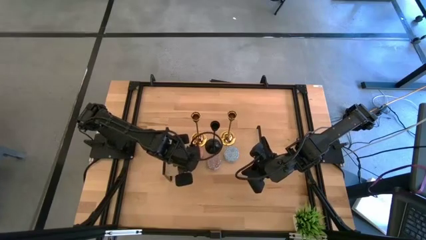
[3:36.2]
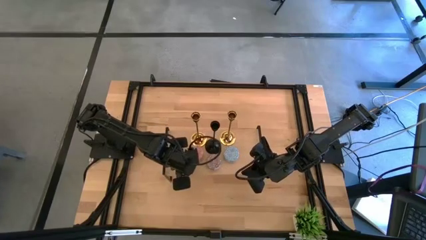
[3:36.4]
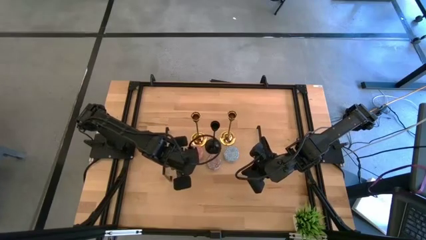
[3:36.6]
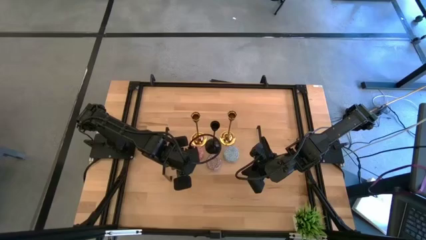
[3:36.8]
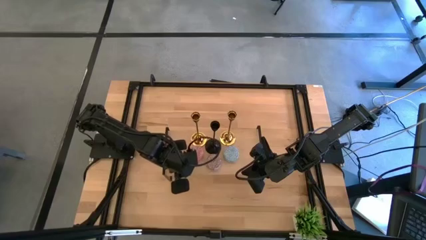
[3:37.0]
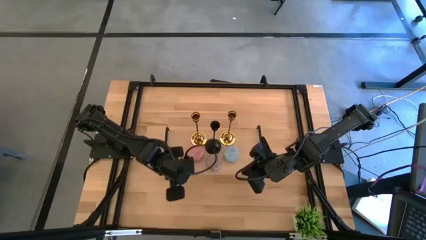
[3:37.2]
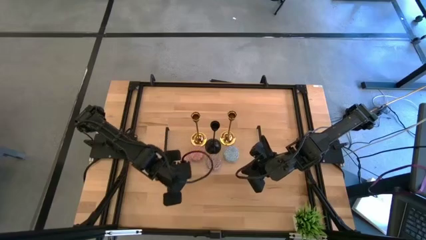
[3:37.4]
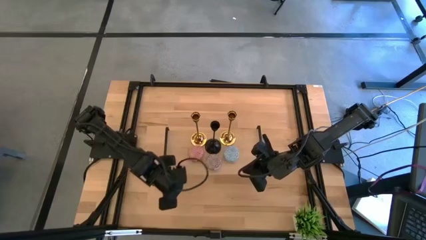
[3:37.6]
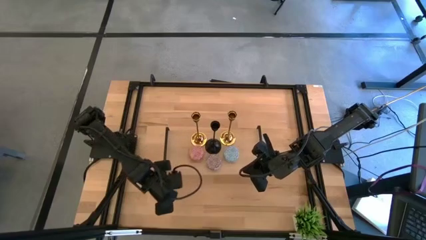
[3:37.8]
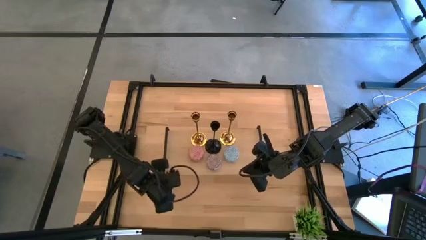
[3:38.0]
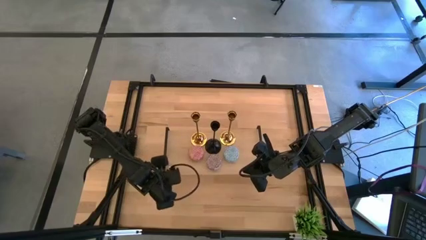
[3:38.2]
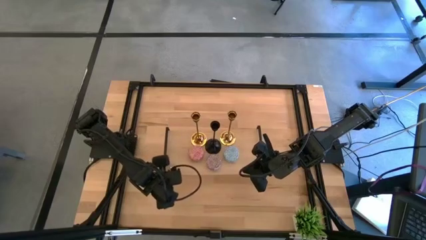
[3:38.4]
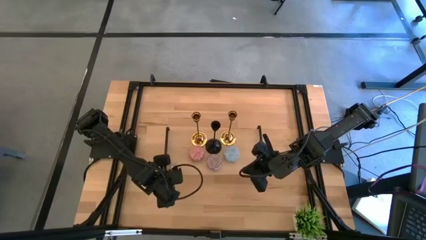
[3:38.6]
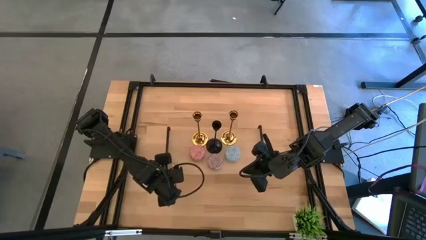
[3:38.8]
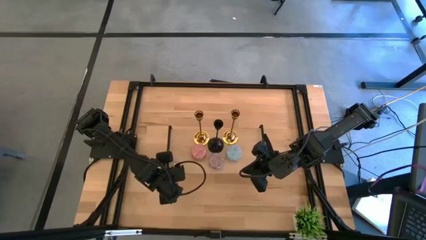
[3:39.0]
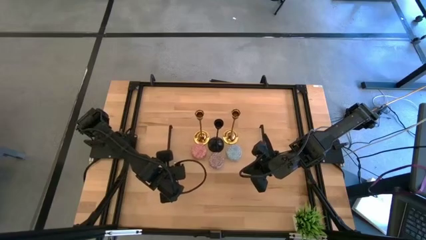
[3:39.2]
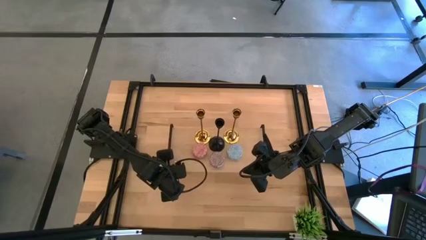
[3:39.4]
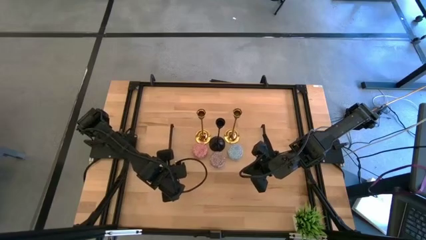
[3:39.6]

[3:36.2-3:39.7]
Task: Pick & Place candle stick holders
Adjust the shelf

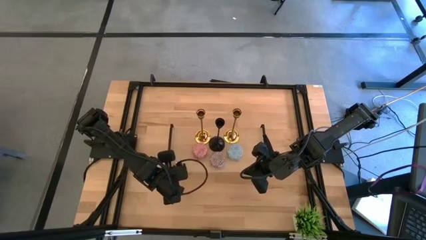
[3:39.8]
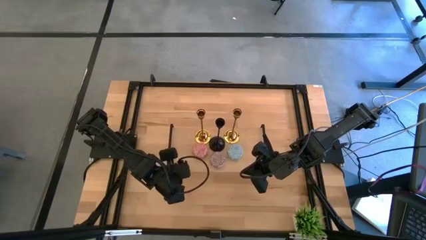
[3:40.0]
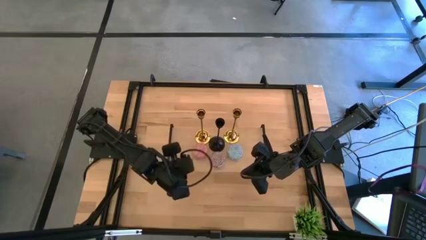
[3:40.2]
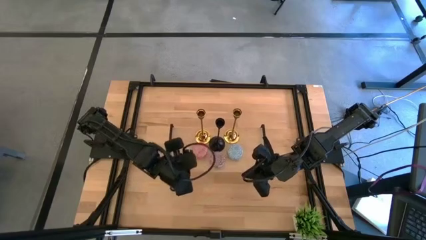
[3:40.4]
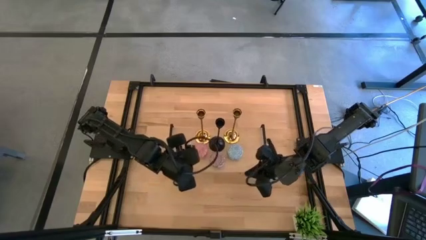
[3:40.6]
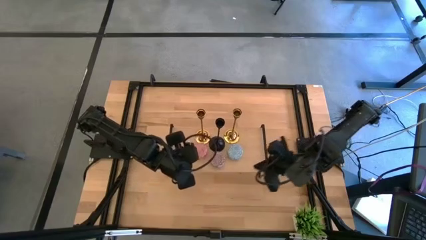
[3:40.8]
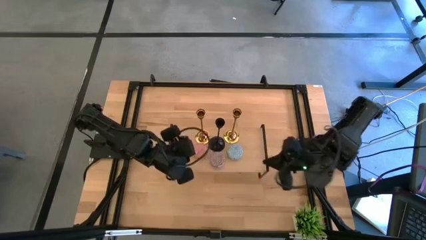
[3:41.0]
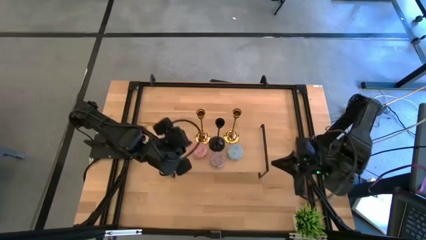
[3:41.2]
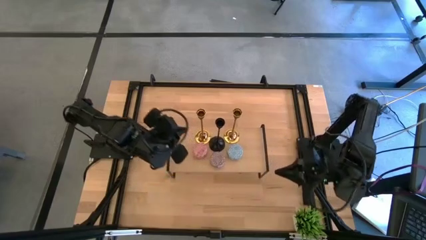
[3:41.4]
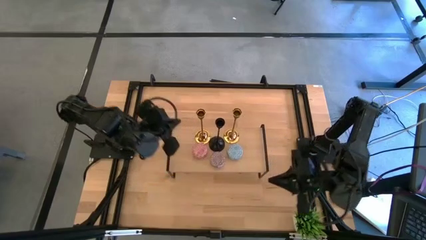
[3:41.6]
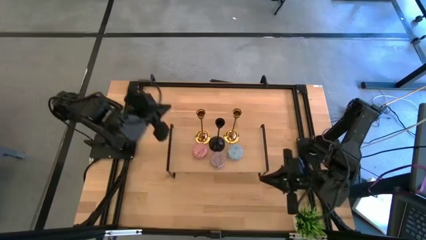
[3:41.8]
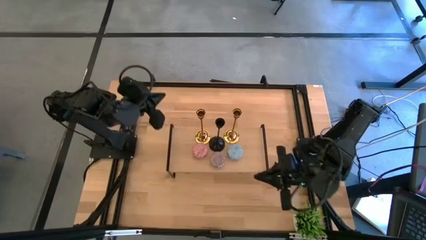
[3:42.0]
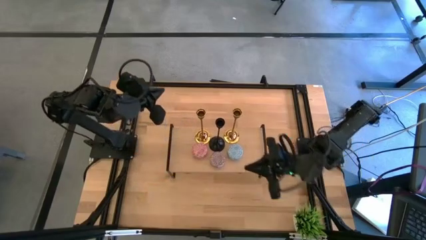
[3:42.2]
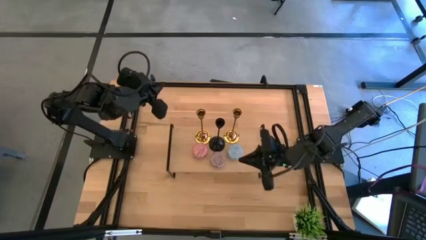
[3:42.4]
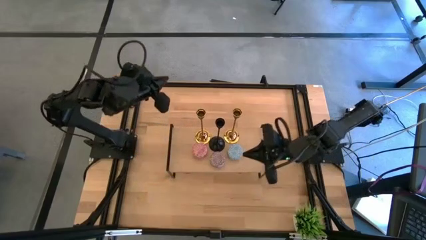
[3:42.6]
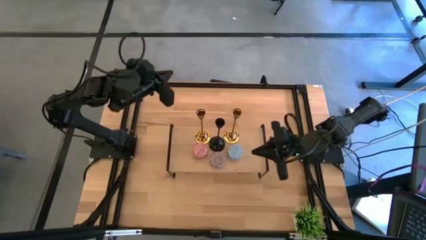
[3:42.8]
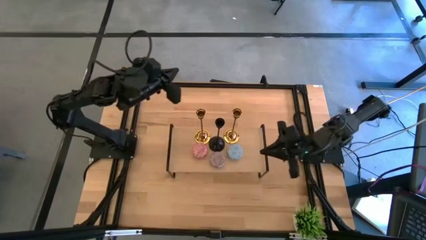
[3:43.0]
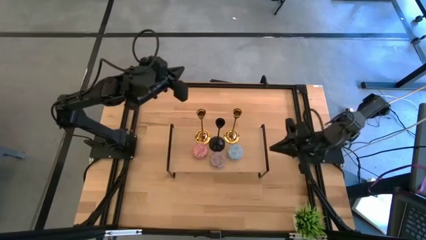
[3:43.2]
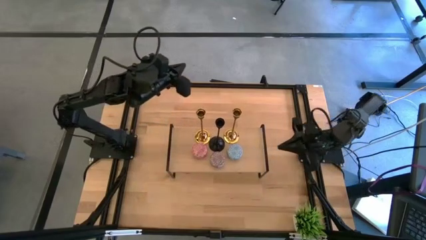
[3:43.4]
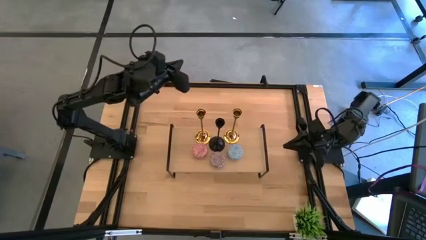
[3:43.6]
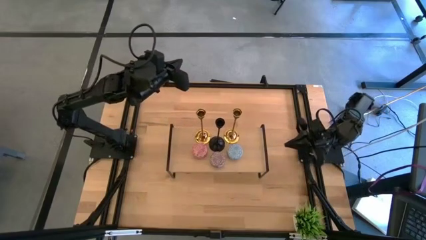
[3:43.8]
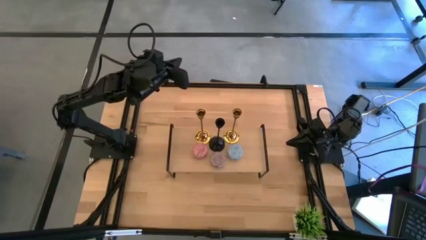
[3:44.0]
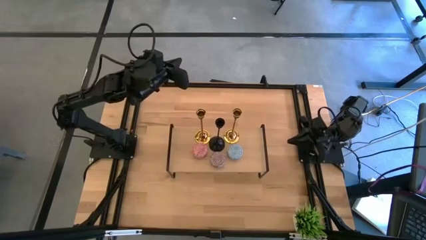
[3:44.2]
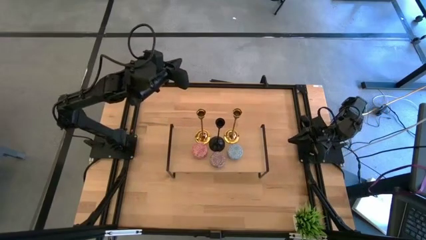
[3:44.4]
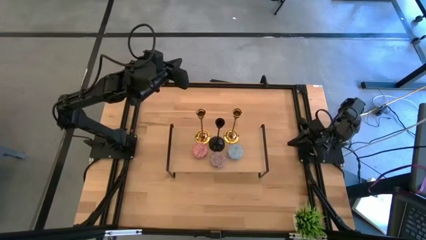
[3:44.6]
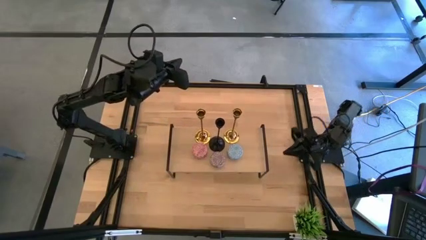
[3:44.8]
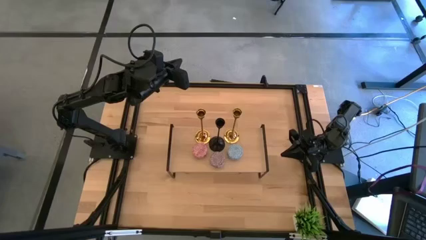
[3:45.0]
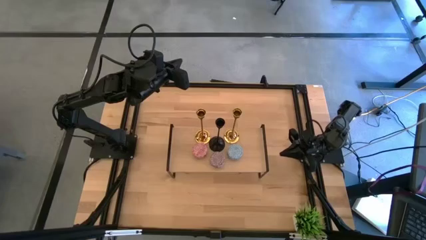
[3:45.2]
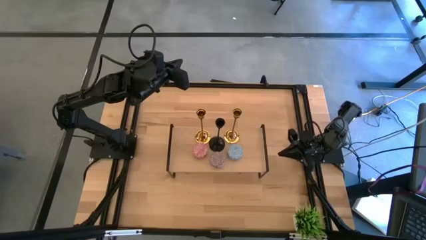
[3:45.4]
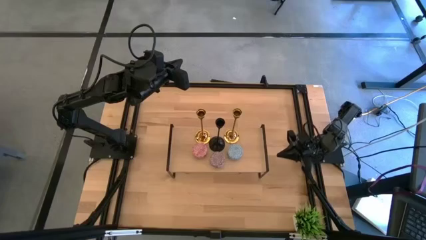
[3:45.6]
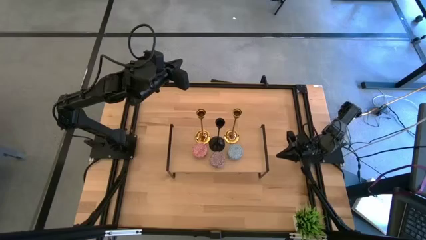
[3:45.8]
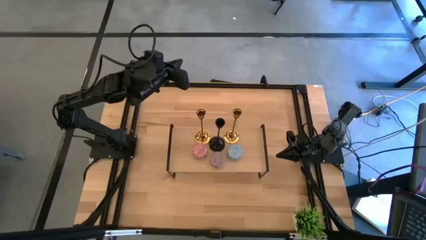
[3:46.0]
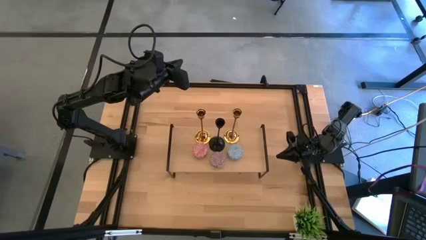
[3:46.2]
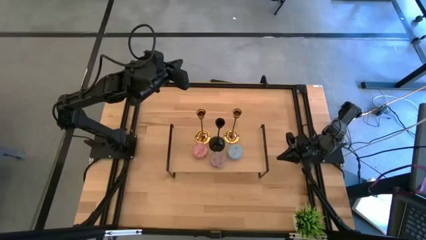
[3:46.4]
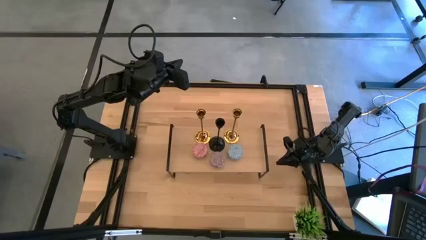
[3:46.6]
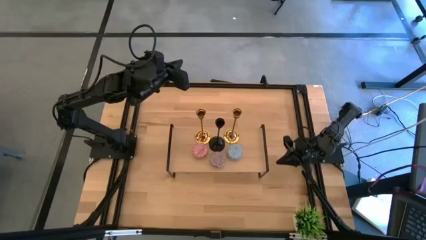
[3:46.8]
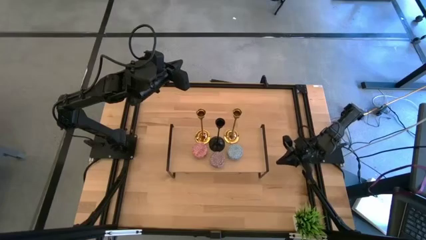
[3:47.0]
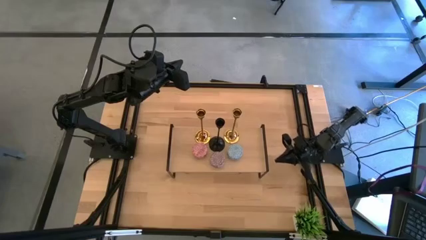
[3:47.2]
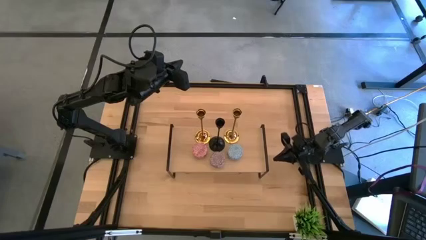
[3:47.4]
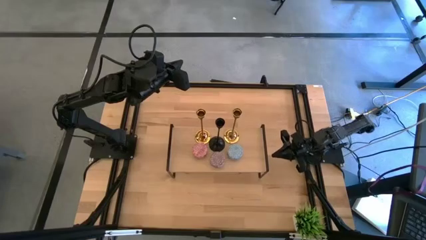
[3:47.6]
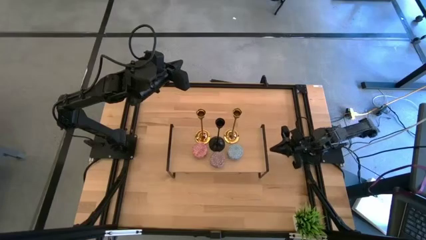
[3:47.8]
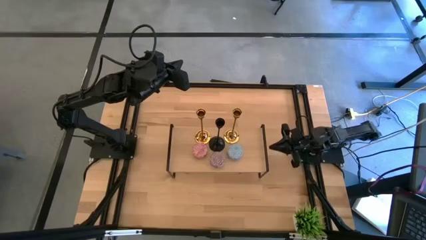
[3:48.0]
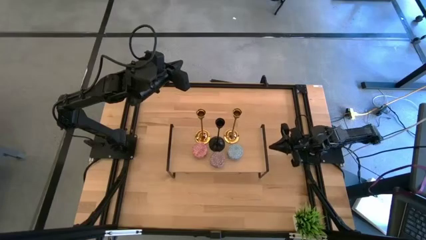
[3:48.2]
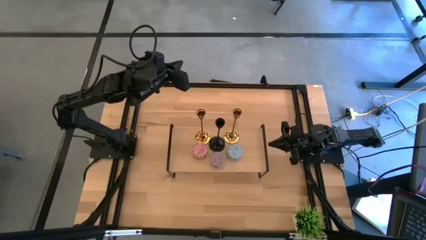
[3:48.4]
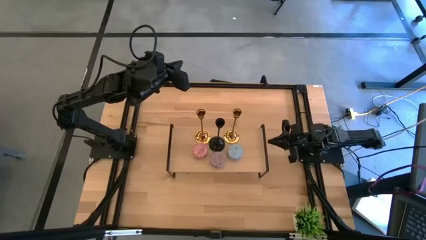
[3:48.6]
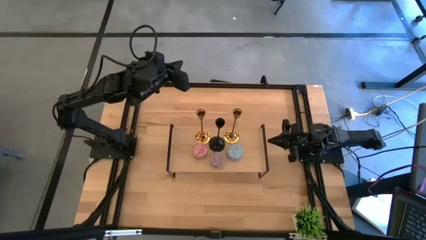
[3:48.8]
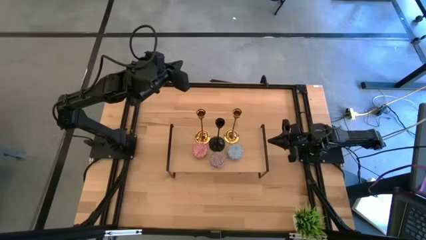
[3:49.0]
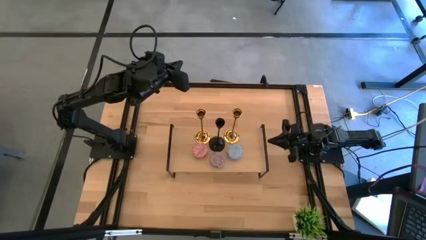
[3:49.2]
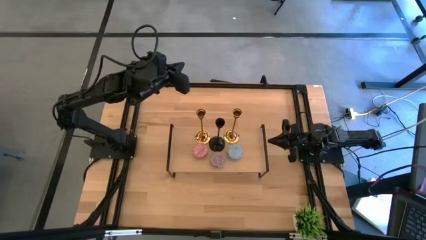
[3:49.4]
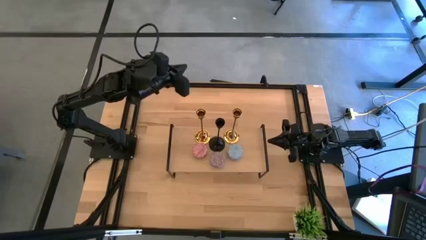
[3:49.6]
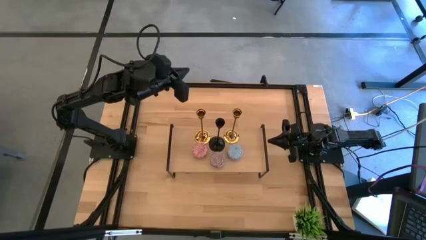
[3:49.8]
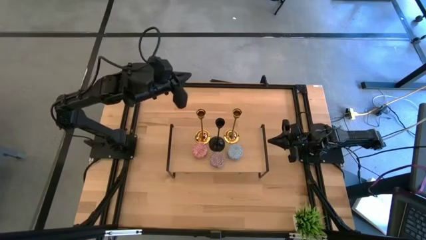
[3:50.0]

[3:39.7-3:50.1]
Return to Home Position
